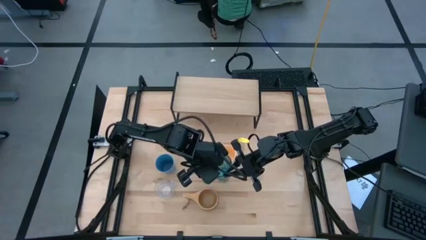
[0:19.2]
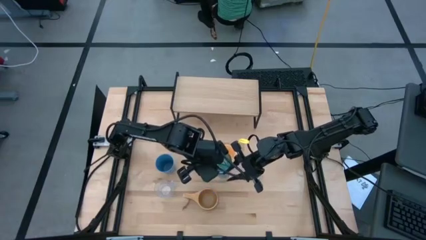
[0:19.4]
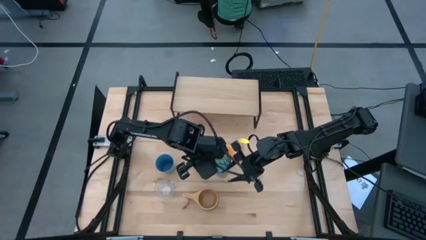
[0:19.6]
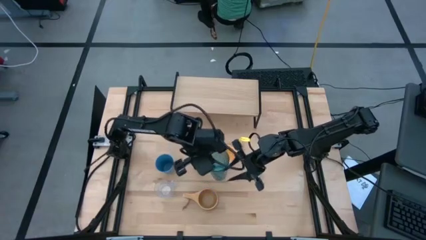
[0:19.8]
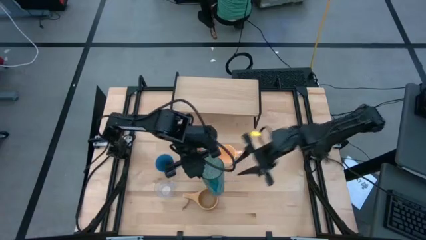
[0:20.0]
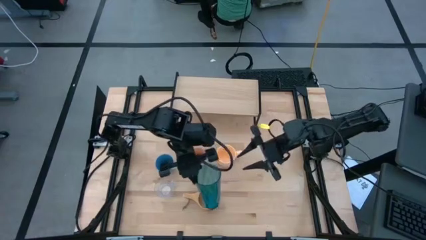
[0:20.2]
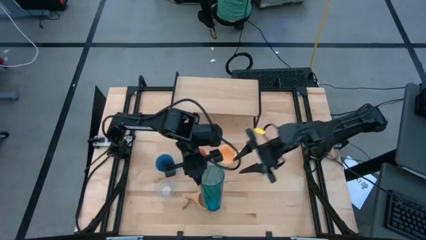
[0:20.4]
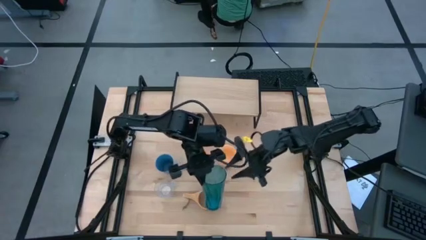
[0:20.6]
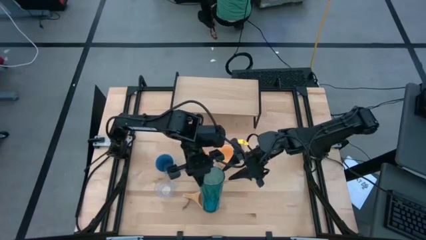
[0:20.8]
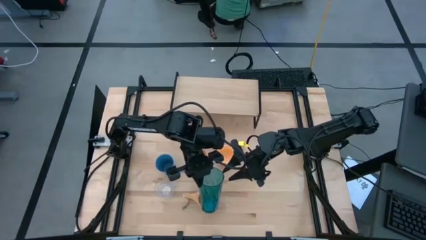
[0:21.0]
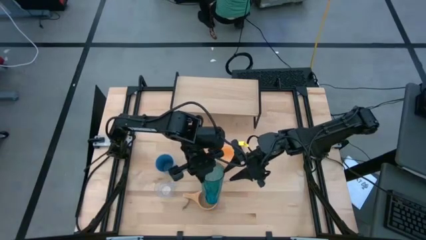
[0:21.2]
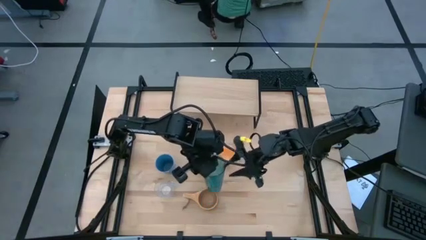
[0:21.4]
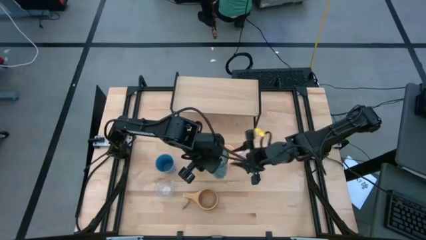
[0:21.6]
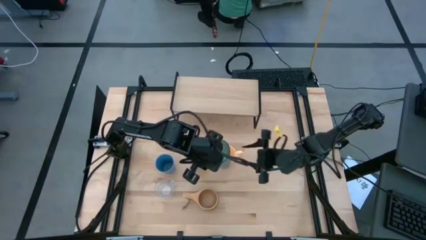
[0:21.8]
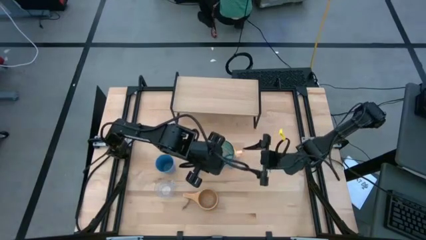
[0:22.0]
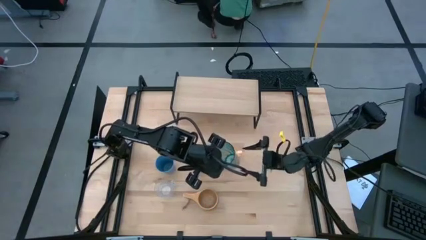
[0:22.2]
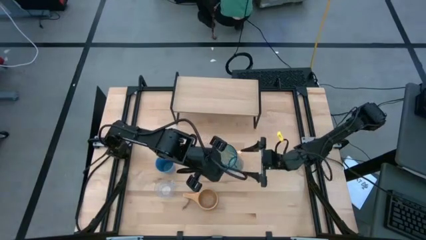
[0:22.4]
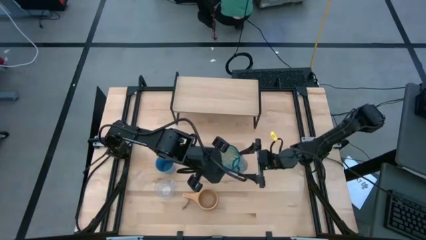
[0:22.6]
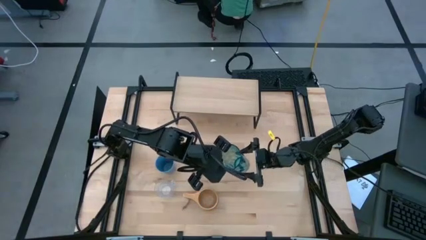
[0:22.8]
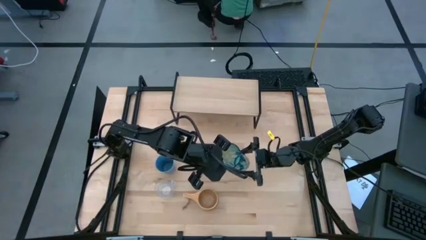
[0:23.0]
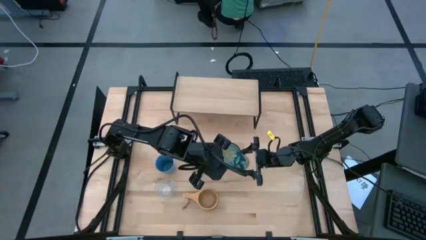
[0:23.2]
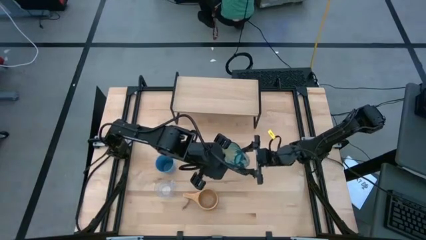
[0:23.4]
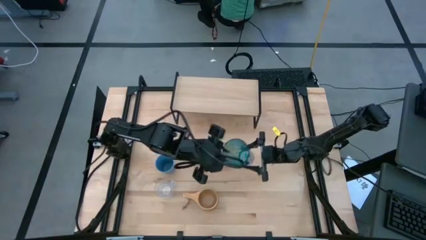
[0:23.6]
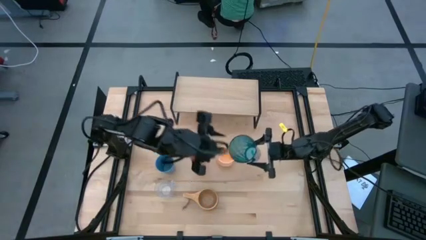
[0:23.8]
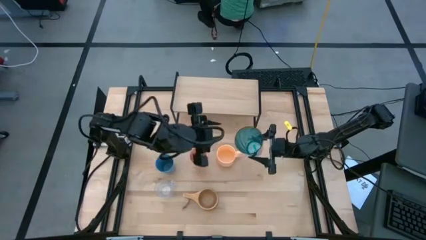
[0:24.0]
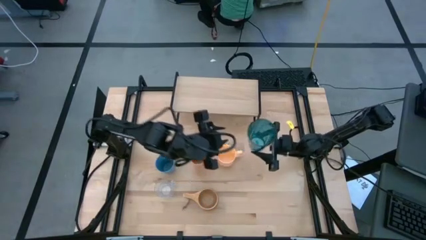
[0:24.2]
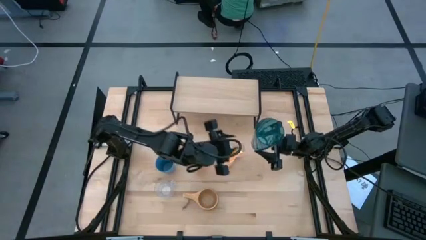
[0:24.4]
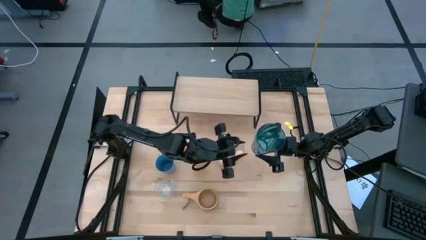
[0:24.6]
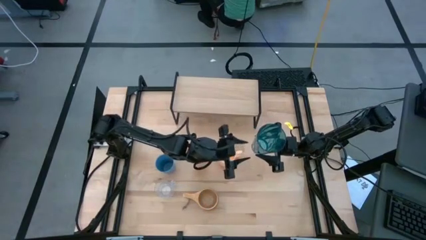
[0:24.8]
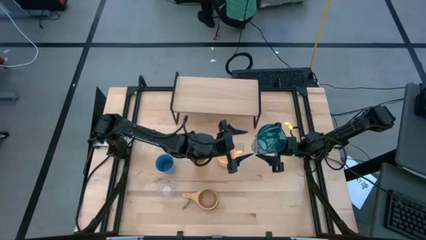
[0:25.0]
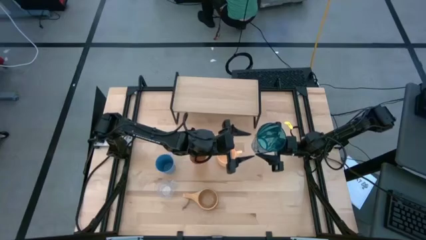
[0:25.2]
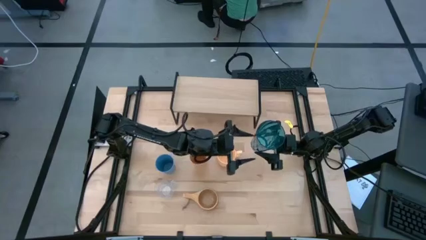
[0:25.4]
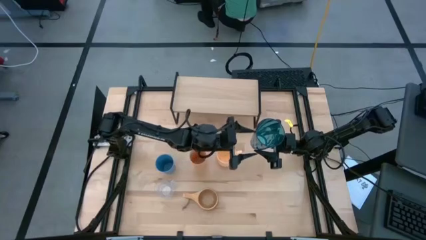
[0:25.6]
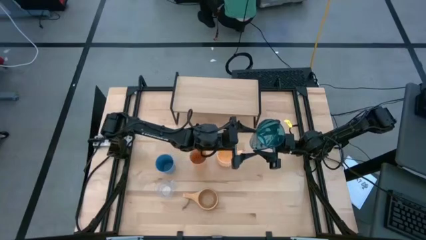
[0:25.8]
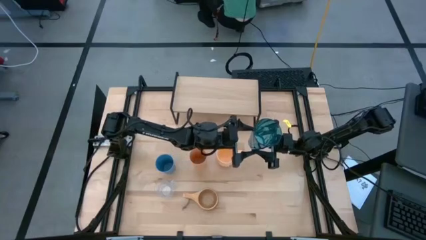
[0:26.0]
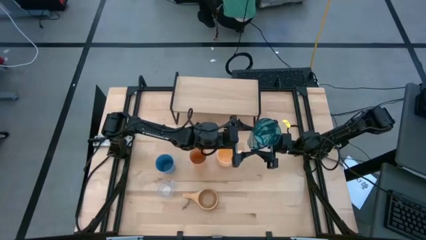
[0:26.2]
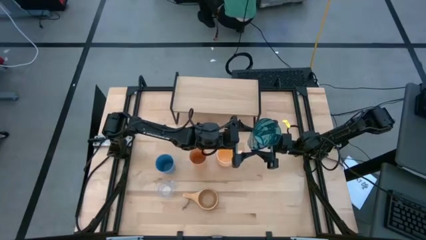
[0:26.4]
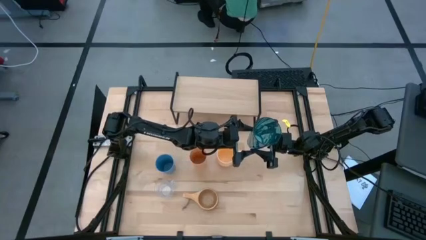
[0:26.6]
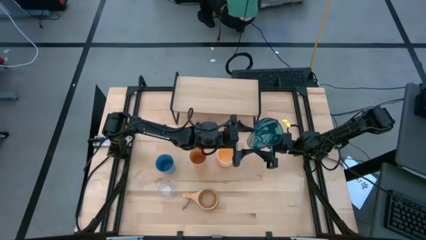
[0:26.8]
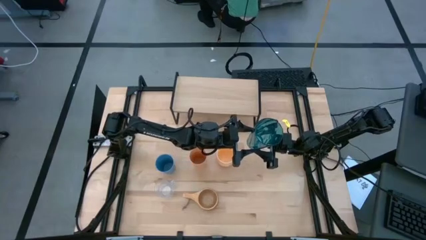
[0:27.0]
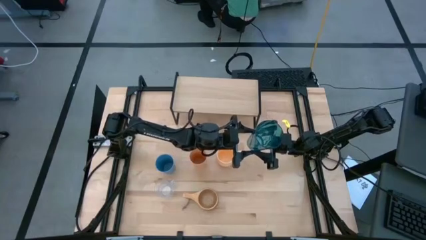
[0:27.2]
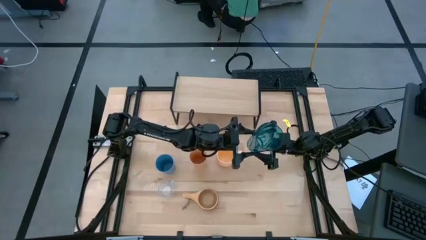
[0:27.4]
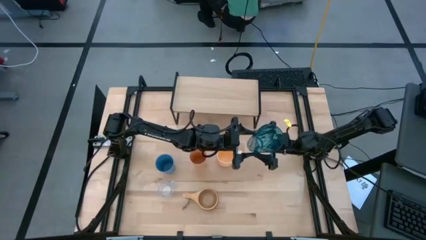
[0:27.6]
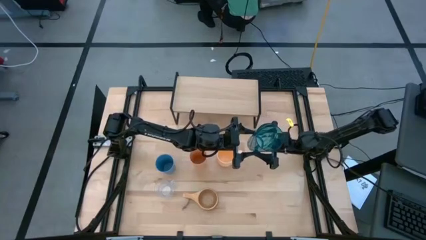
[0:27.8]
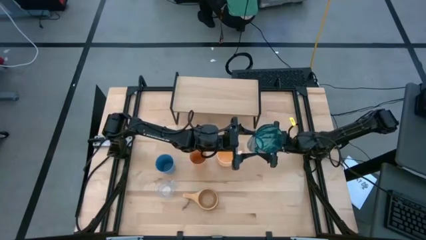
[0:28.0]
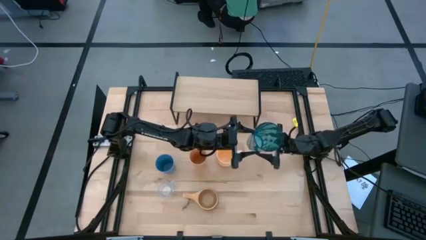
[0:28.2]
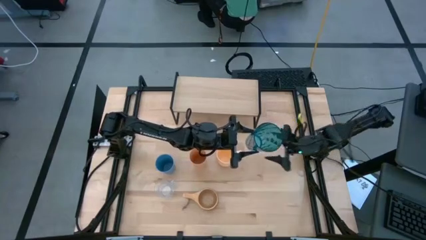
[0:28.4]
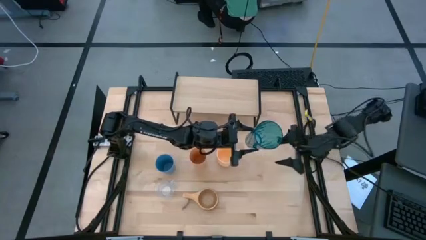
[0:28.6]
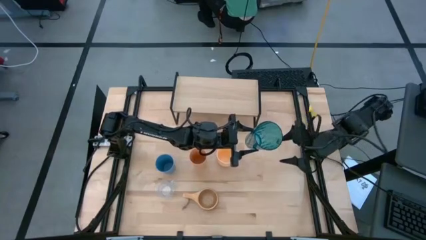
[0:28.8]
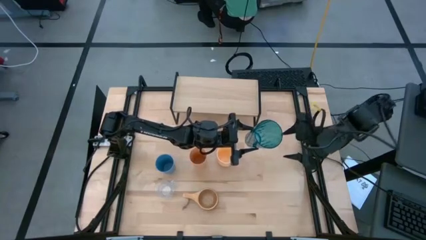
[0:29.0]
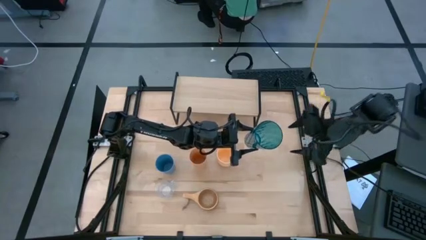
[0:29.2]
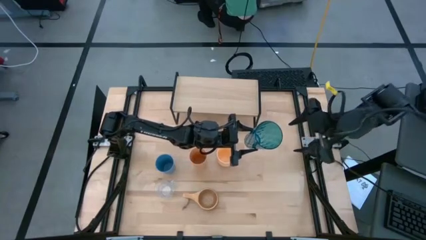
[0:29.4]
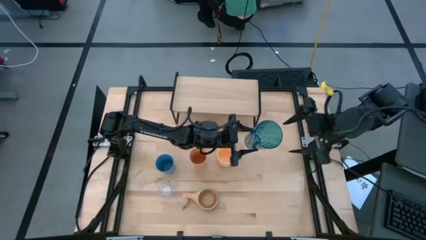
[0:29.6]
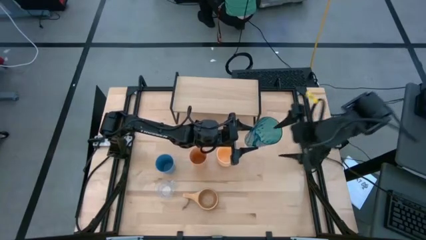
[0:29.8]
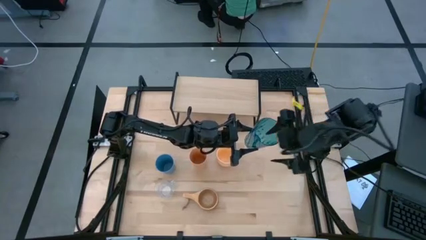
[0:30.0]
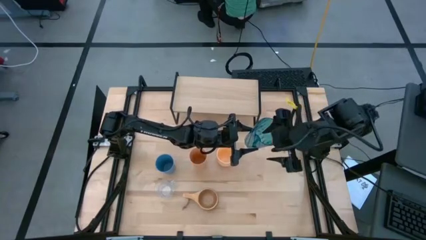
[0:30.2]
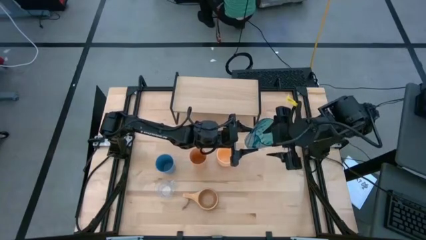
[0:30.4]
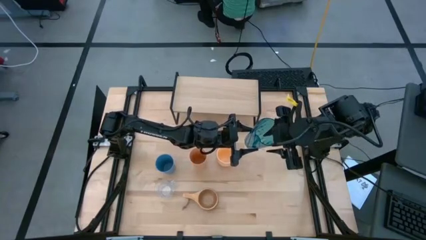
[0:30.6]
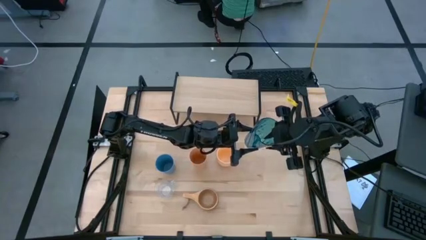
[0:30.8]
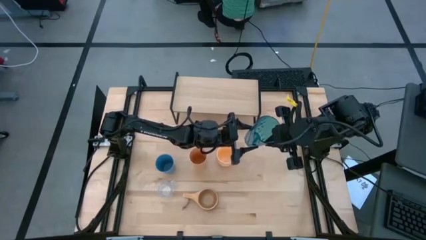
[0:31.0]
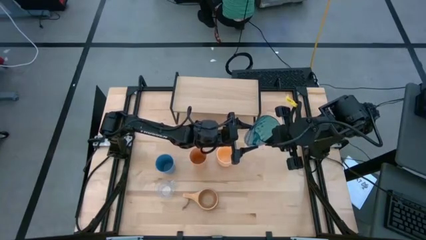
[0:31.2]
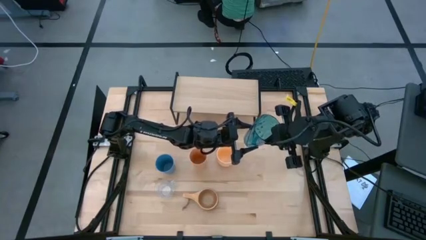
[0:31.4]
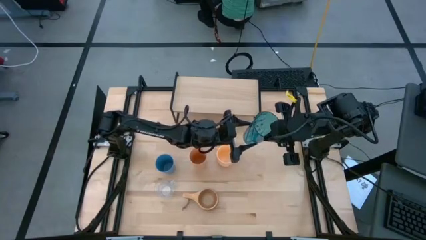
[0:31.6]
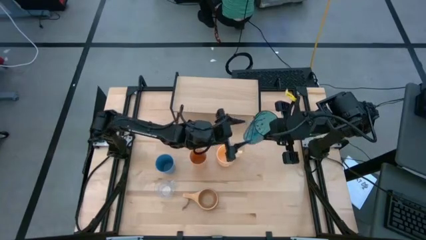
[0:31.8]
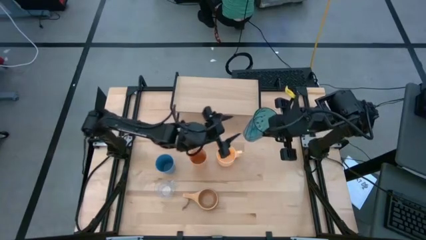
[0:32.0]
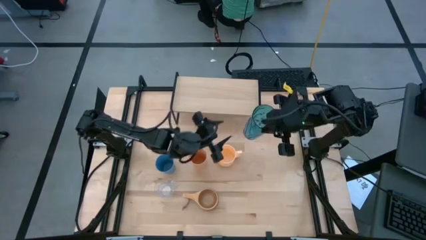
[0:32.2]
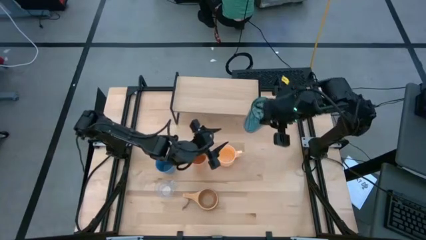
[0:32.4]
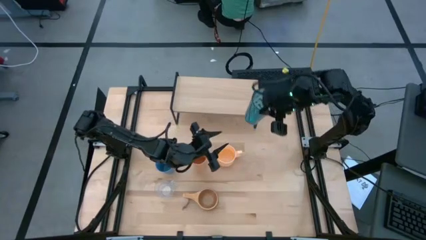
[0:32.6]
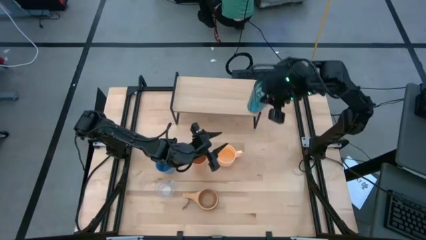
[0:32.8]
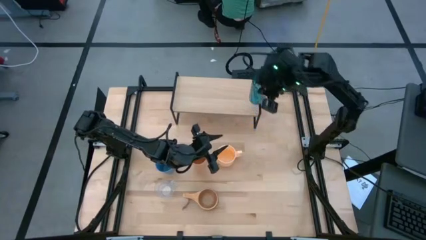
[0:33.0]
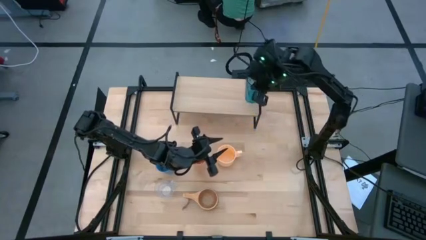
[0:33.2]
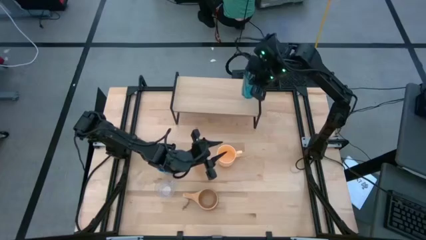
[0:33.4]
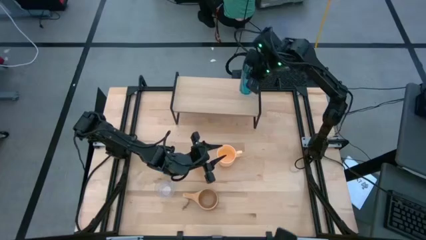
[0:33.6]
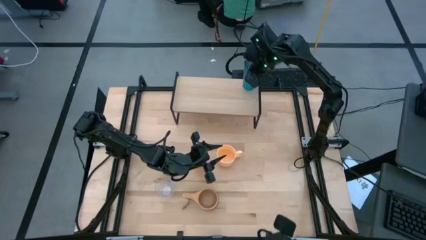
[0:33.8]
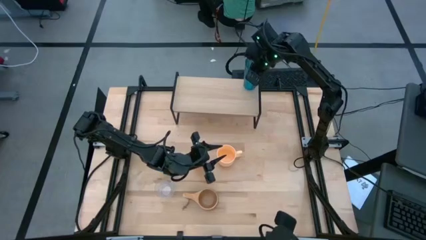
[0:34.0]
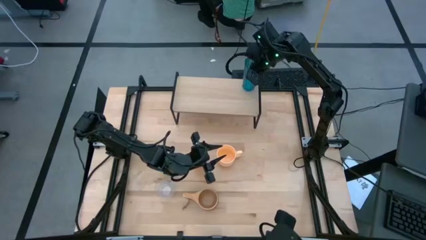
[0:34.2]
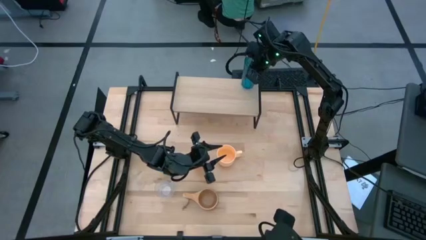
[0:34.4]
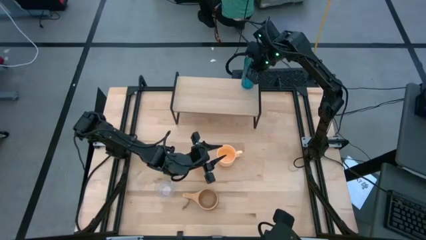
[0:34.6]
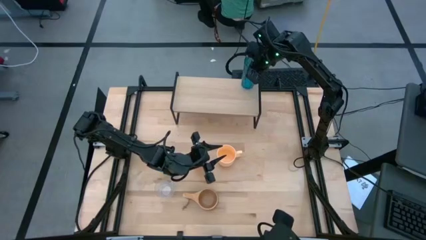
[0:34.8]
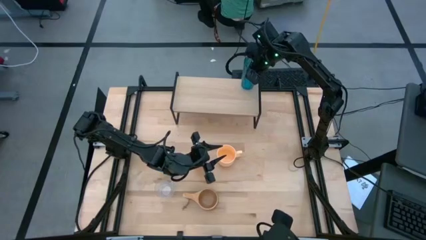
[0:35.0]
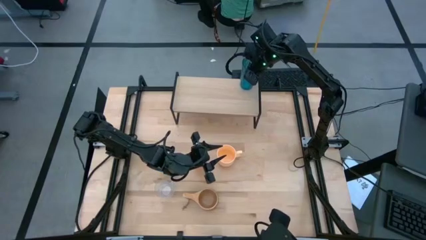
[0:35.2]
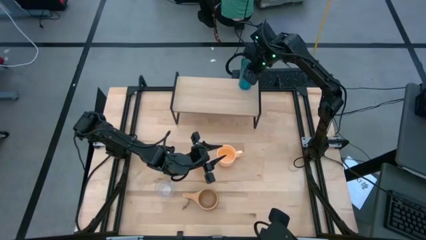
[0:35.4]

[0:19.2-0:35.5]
Task: Stack small to large cups/mugs on shelf
Put the blue cup on the shelf
